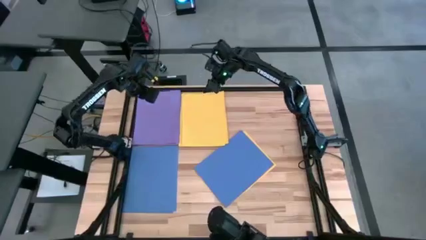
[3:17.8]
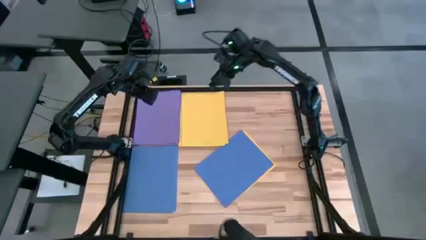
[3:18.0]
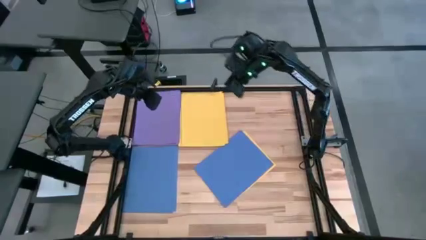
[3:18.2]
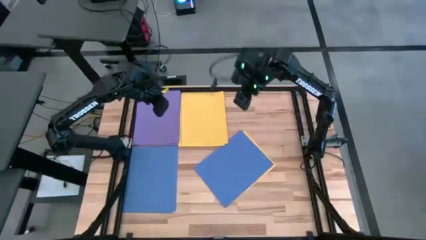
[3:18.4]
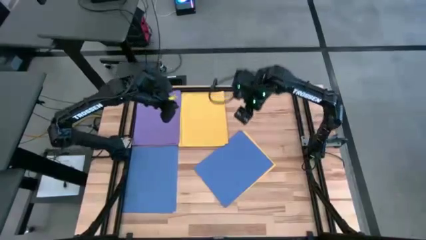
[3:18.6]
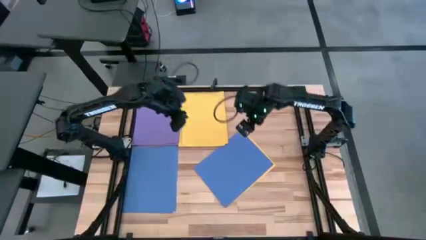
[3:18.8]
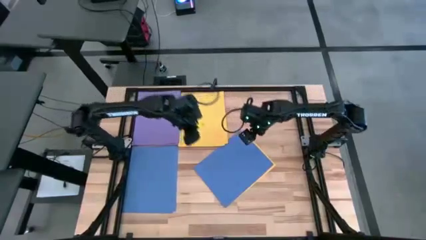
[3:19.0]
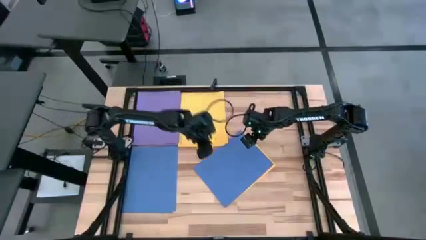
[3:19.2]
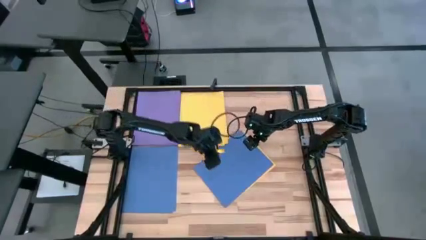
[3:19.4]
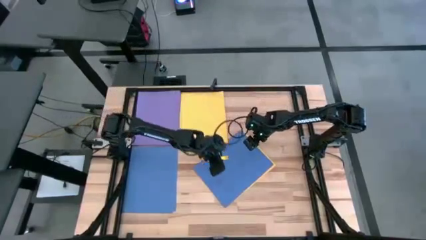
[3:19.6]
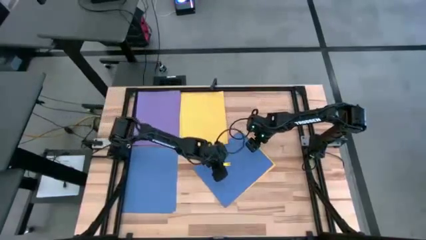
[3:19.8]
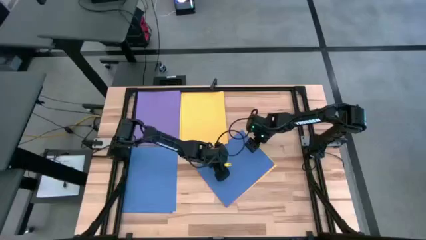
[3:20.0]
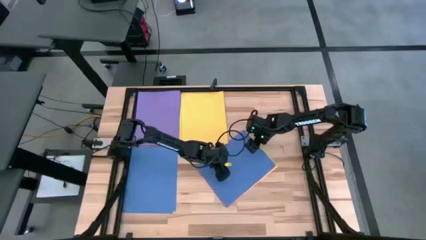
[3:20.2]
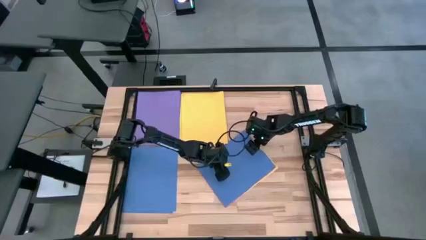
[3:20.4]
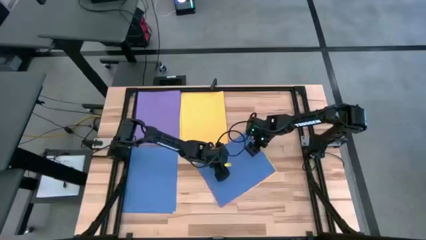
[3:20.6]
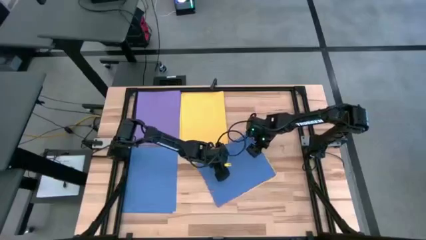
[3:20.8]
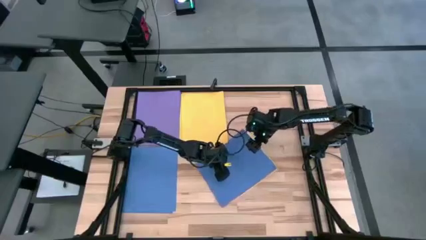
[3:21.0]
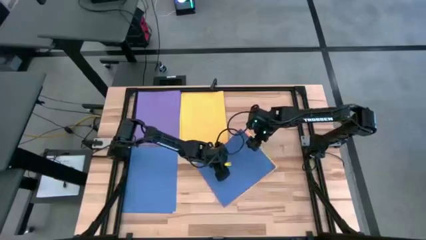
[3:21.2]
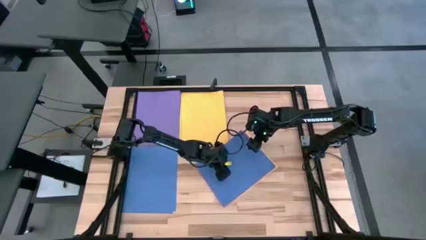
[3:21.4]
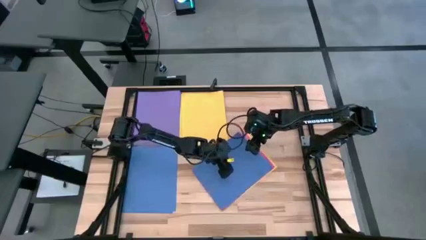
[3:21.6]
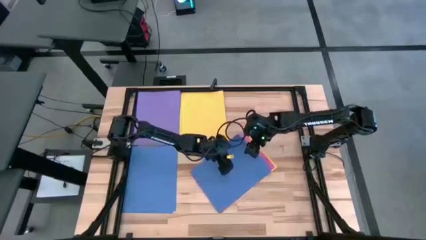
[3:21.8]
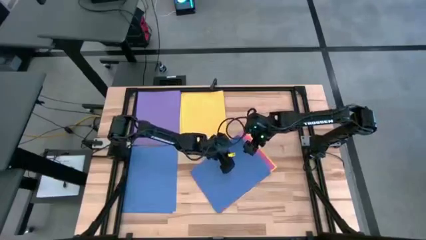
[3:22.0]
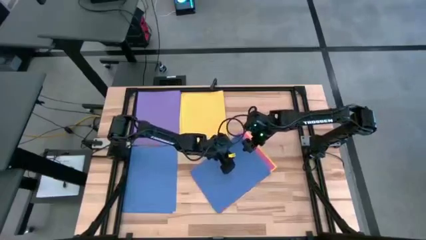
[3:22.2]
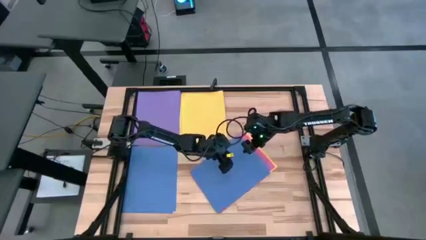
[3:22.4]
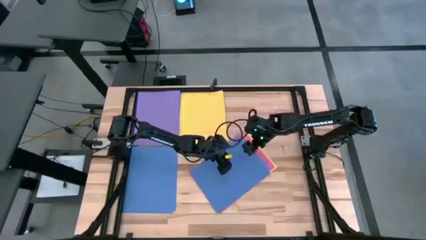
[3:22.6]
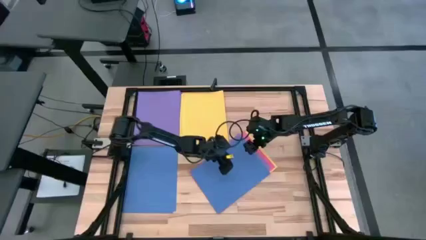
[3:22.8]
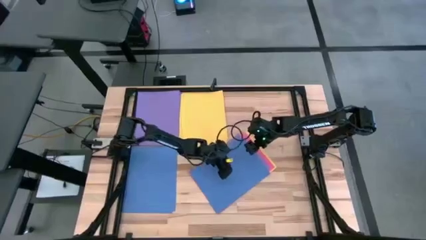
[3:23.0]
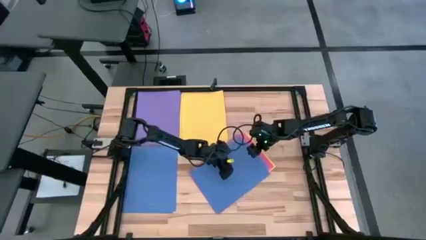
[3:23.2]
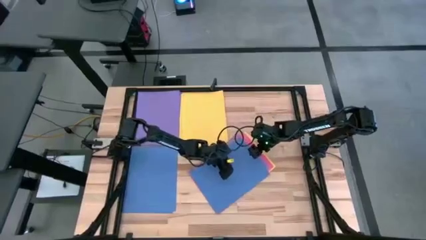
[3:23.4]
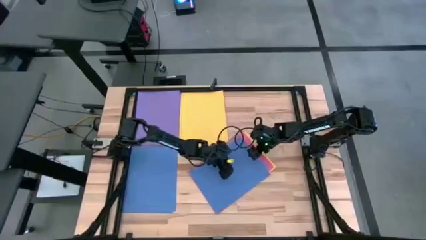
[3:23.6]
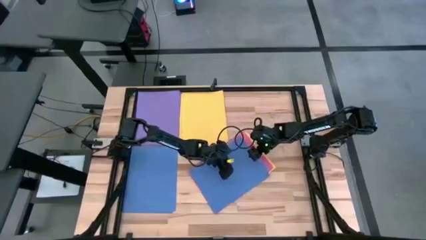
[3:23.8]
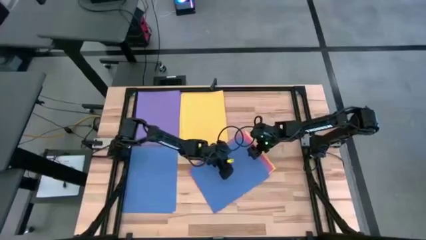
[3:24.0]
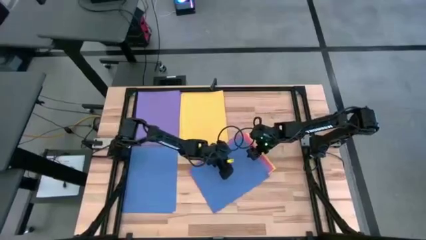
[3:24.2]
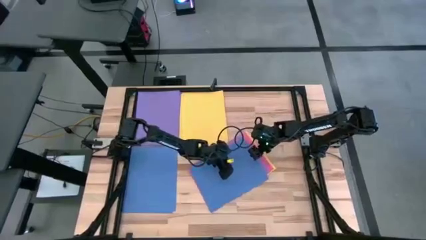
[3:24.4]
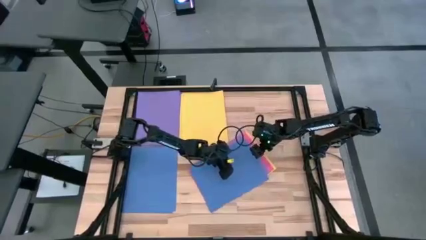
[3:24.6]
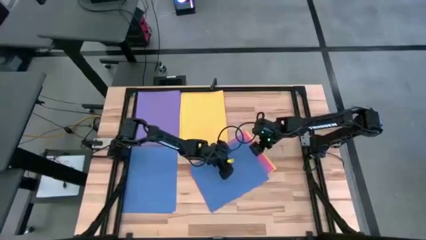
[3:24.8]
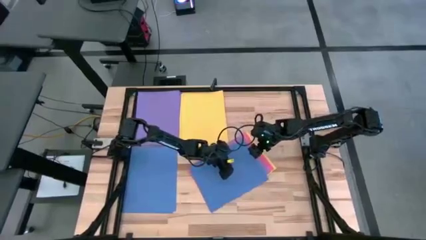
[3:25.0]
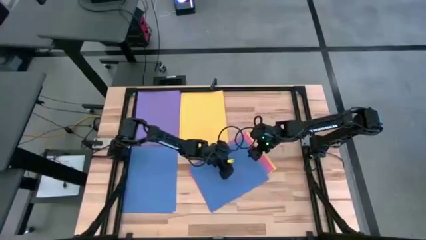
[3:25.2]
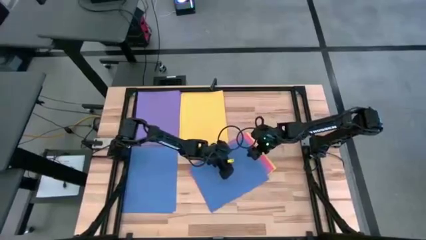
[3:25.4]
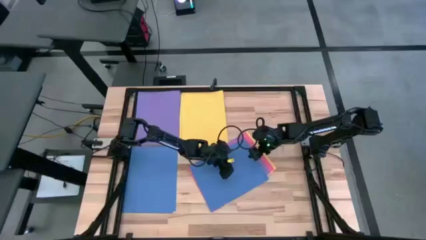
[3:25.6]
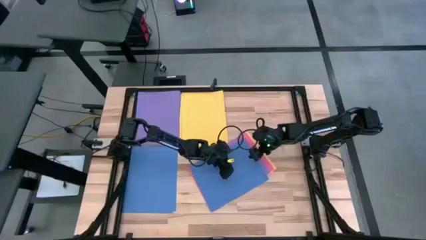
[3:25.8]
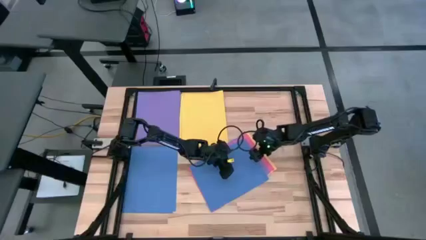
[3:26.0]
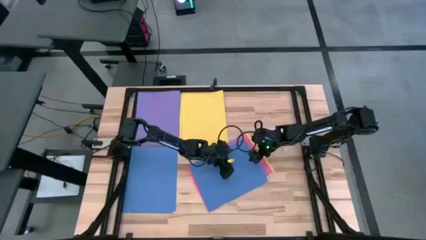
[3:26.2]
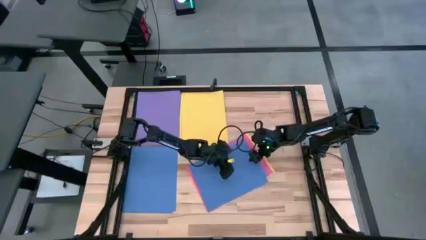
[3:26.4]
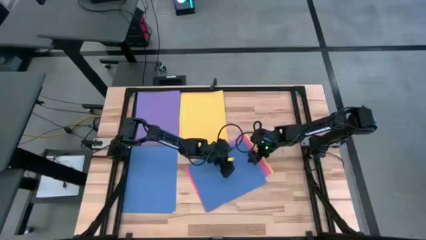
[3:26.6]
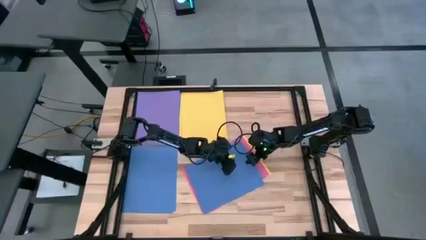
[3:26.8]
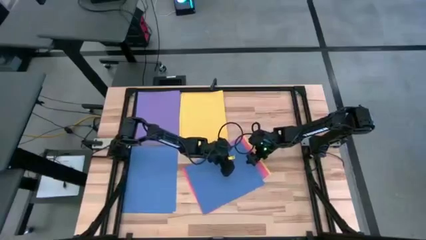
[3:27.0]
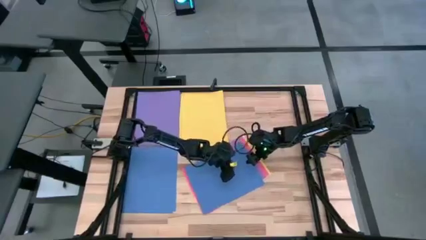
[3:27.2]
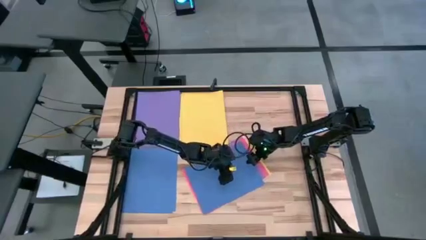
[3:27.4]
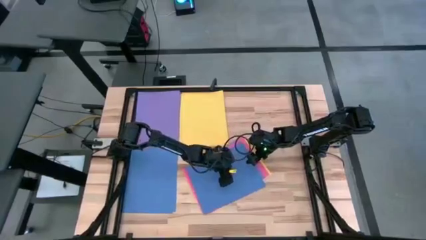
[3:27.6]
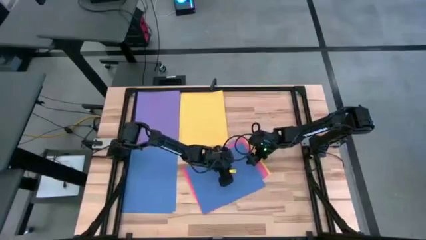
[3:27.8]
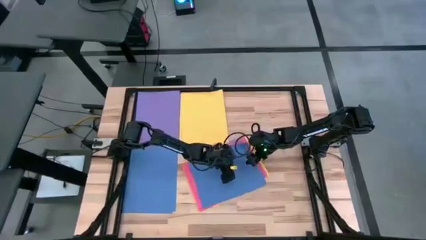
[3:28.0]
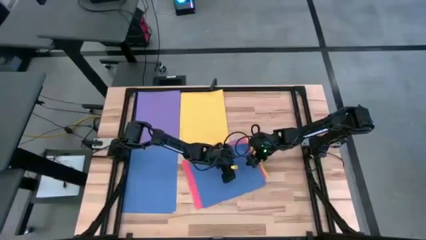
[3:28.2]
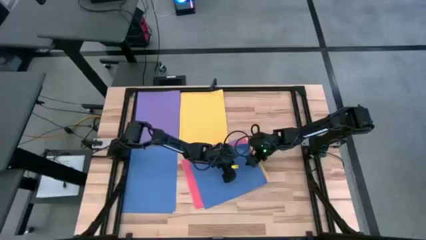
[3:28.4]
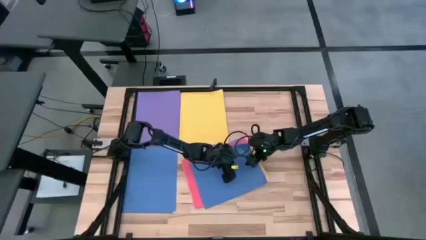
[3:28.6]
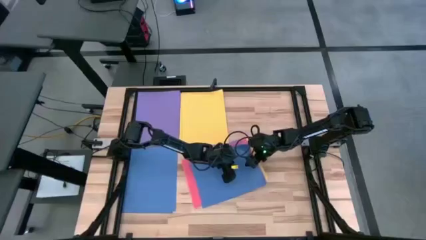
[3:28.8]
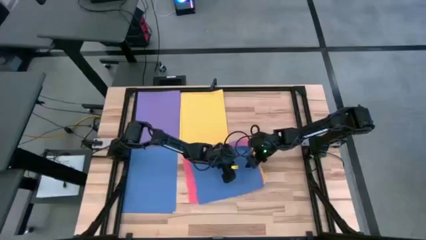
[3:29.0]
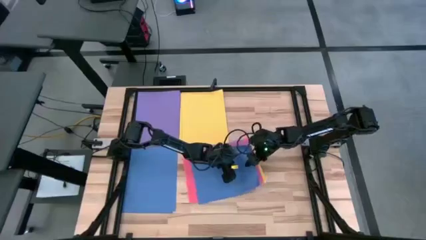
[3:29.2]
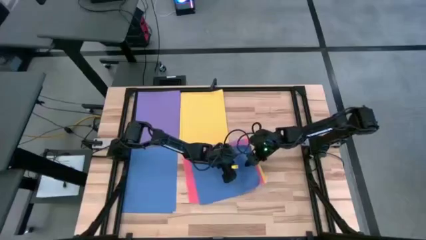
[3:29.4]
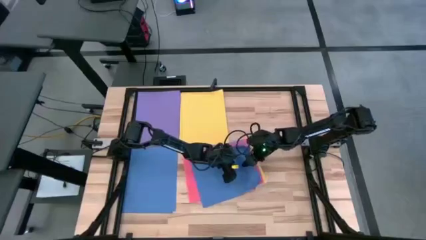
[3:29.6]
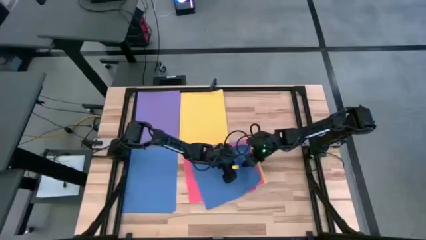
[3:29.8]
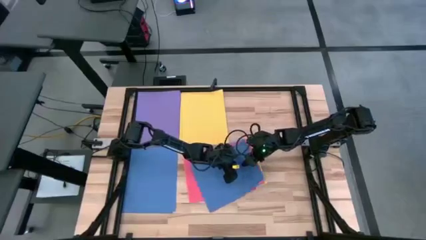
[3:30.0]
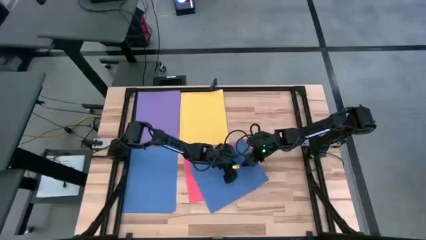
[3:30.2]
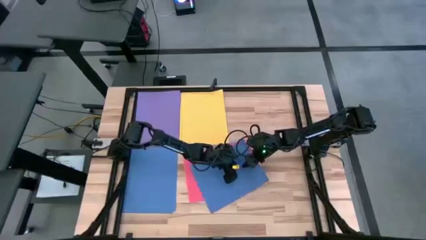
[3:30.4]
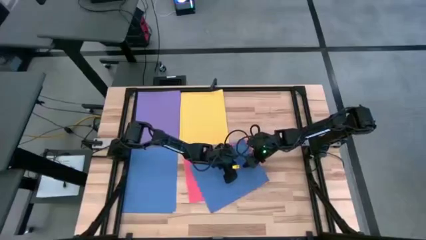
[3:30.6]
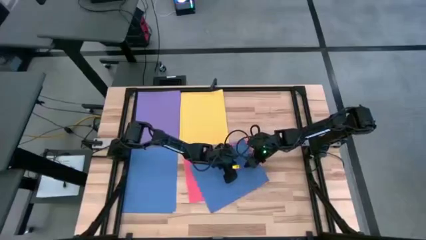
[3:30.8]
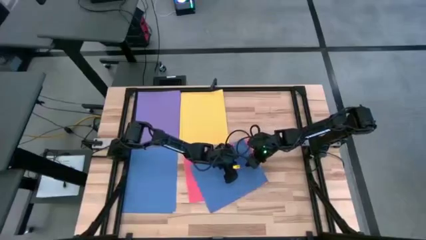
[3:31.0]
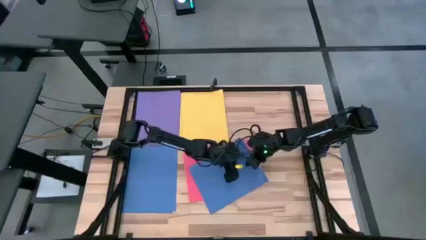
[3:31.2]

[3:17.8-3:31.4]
Task: Organize paper
Stack the blue paper on top of the blue paper

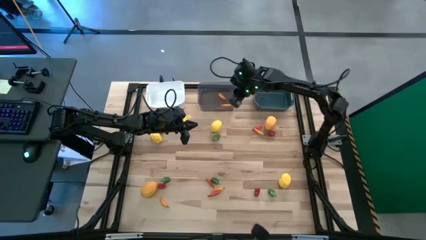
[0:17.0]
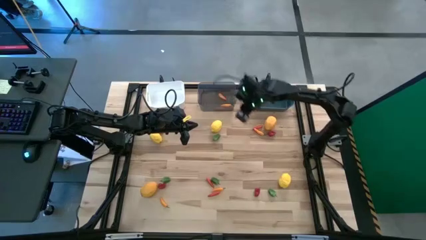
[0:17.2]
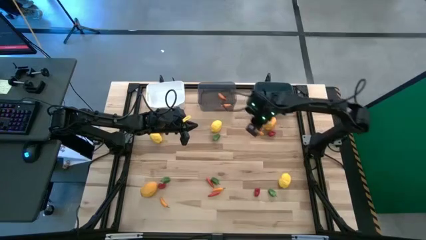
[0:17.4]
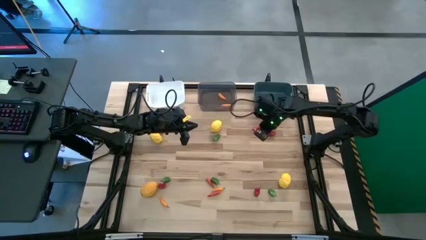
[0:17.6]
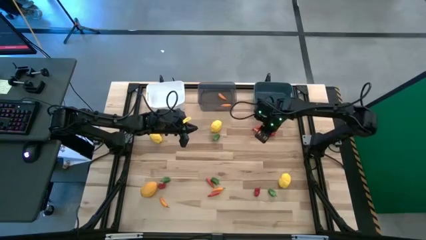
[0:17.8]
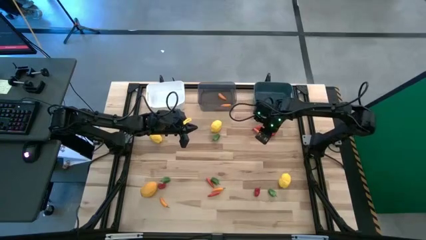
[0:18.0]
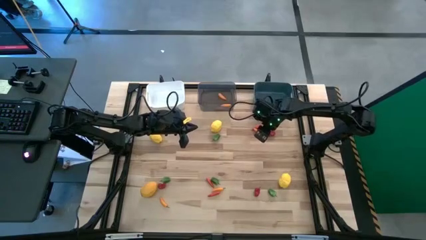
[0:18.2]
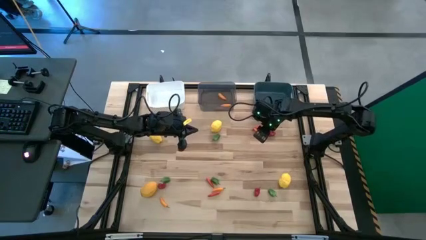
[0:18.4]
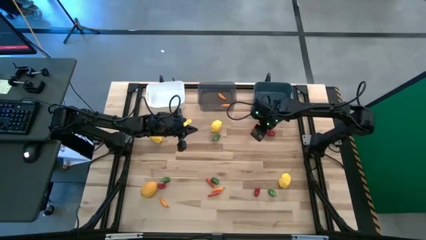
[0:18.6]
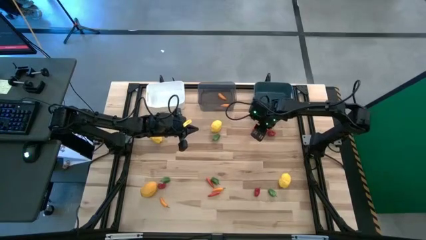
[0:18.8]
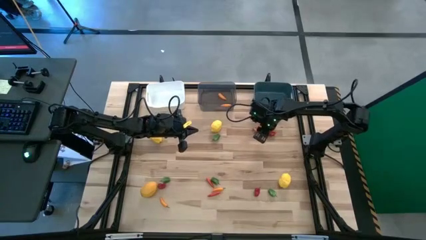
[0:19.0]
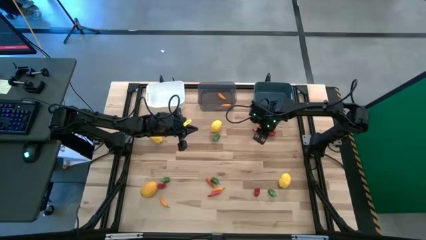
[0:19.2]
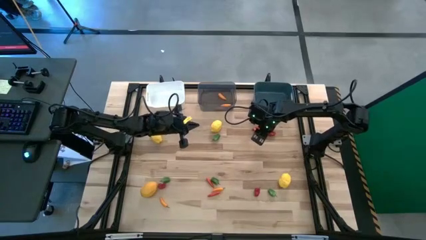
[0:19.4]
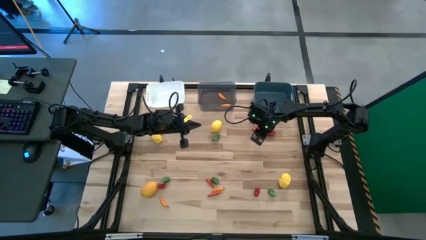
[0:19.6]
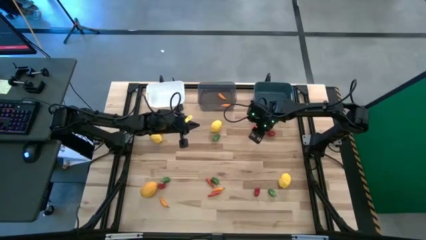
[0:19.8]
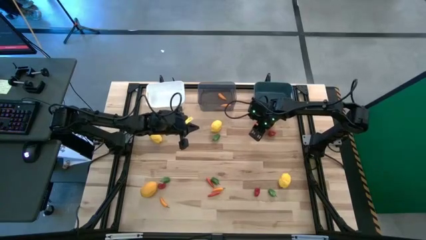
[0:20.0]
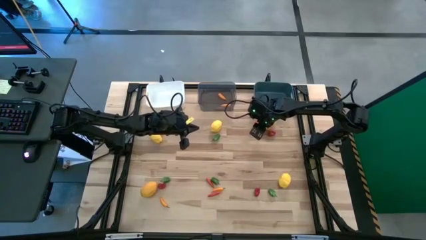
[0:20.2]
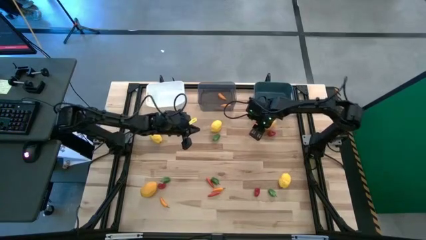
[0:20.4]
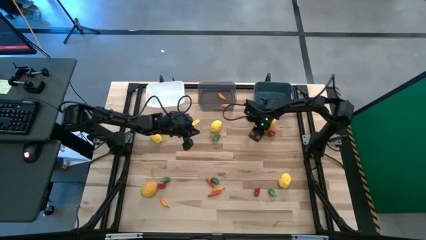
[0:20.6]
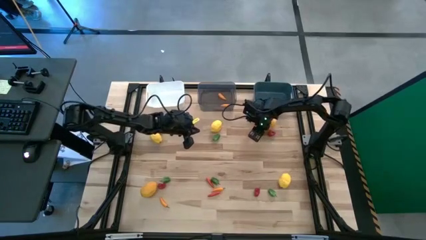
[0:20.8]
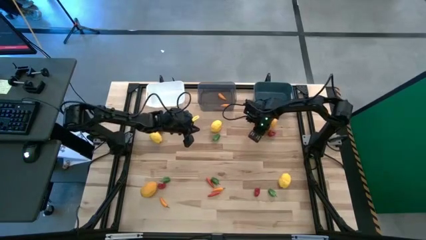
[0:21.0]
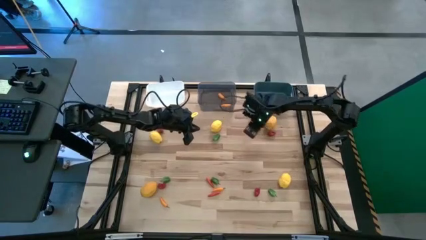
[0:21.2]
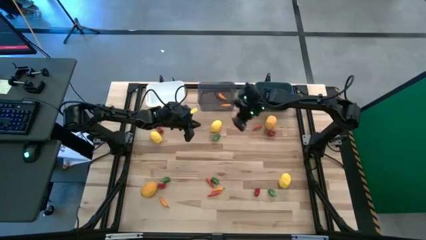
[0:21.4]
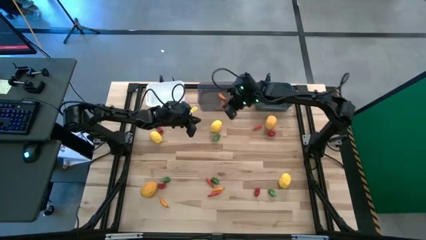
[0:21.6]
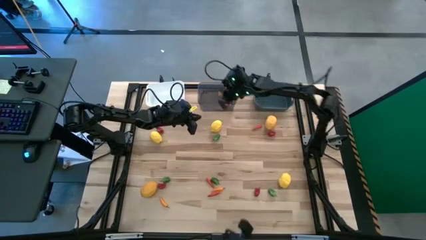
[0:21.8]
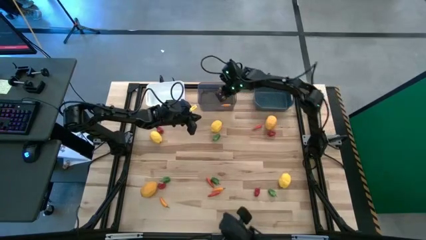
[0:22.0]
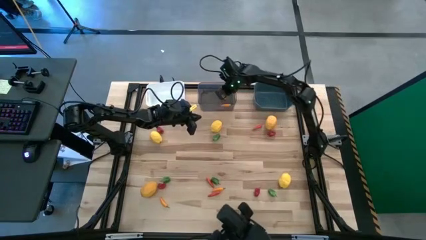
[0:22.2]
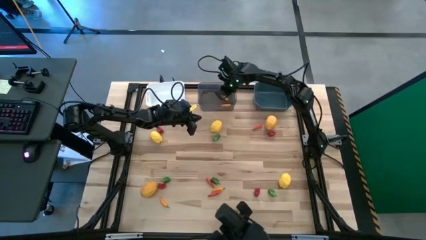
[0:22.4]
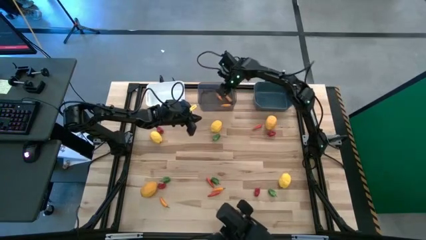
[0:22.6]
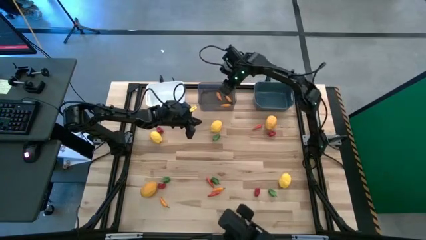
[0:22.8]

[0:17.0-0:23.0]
Task: Sort produce into baskets
Put the top yellow chili pepper into the black bin
